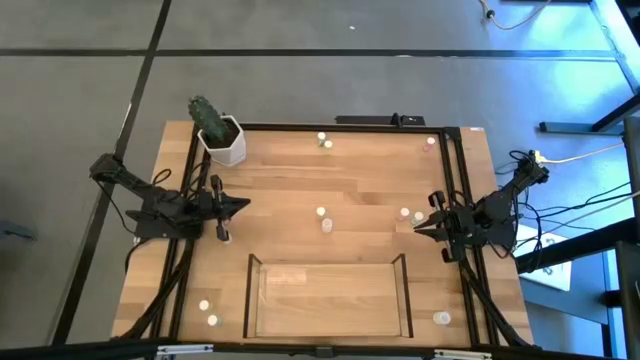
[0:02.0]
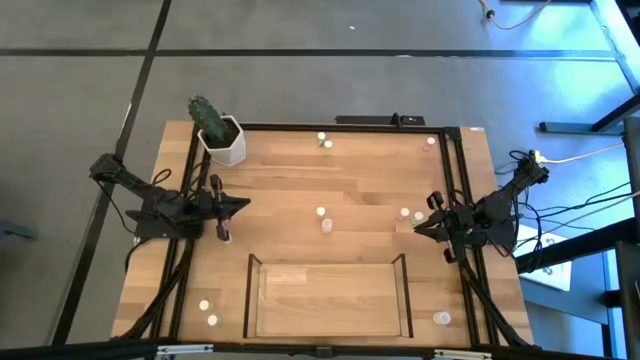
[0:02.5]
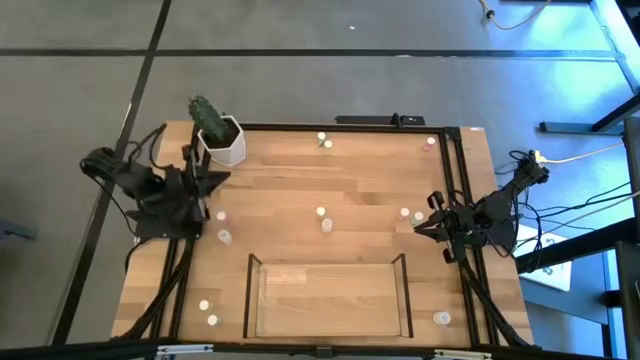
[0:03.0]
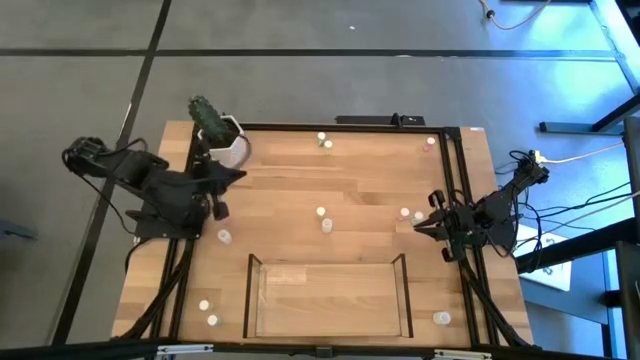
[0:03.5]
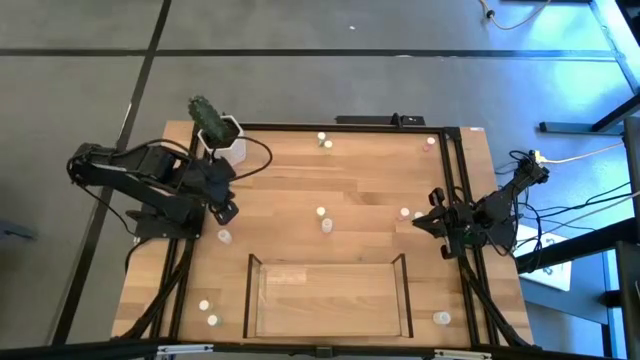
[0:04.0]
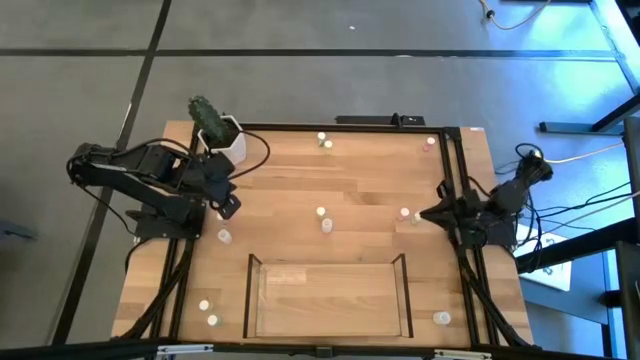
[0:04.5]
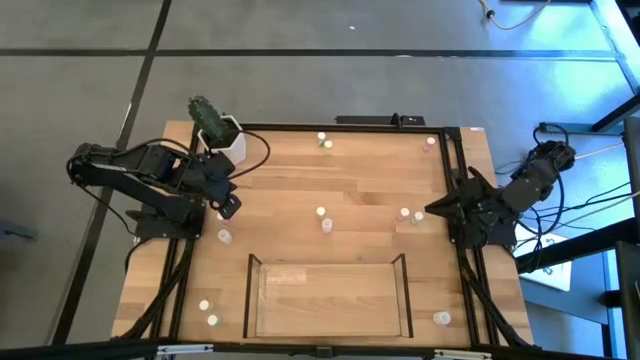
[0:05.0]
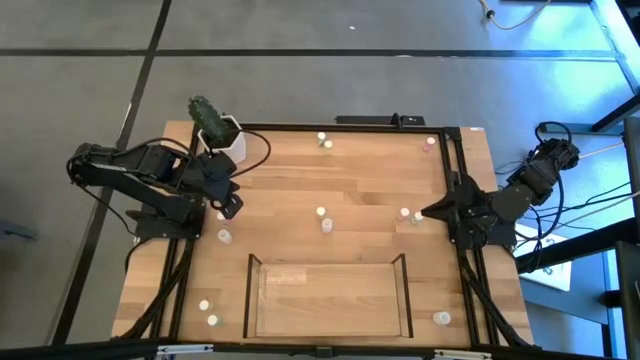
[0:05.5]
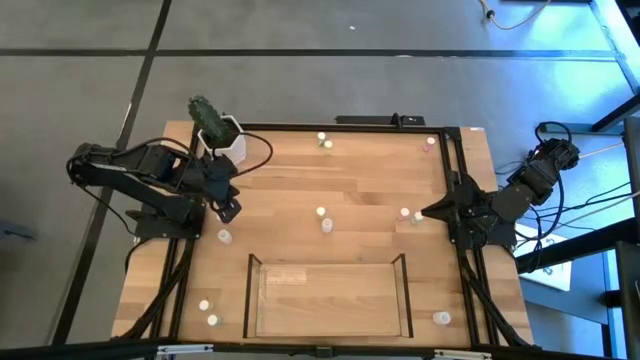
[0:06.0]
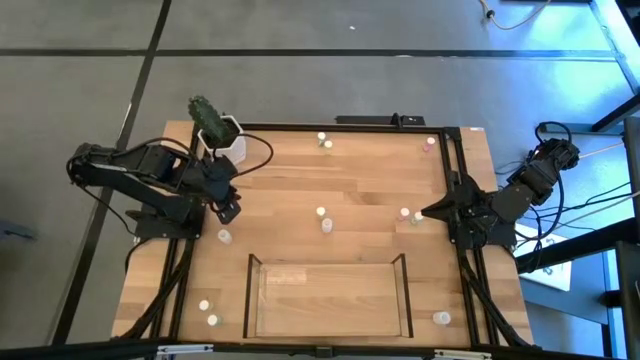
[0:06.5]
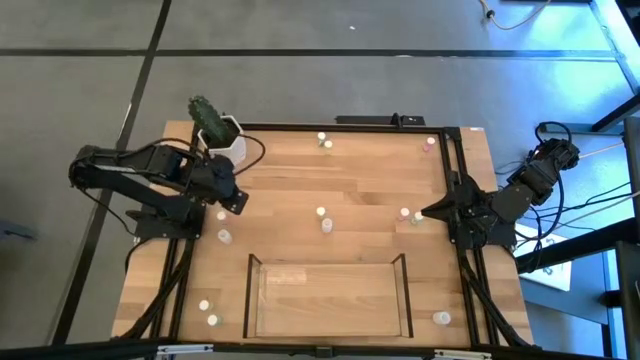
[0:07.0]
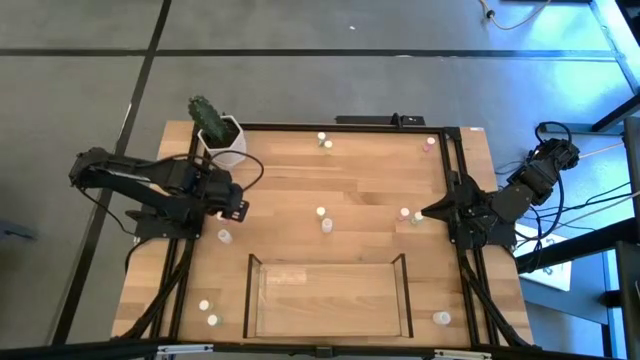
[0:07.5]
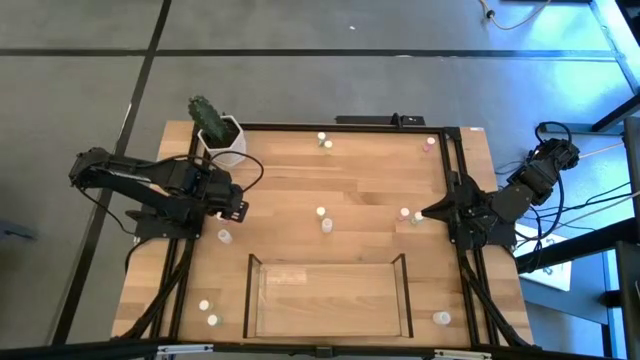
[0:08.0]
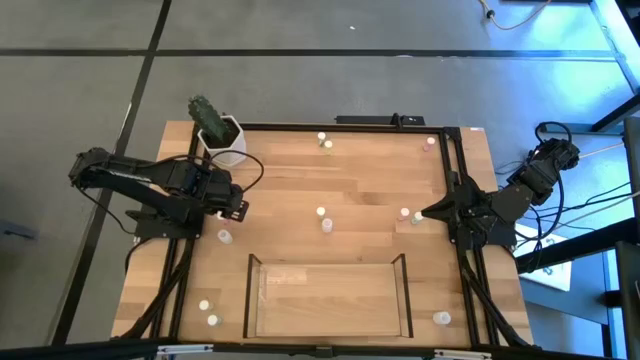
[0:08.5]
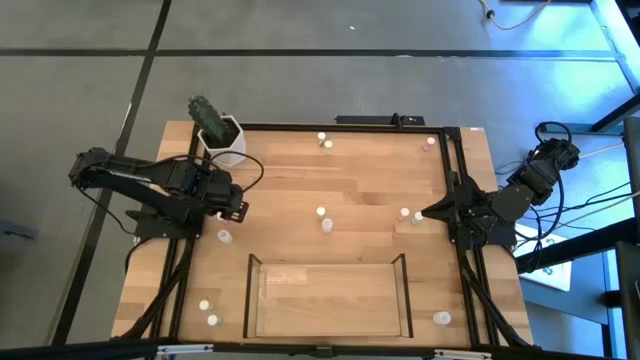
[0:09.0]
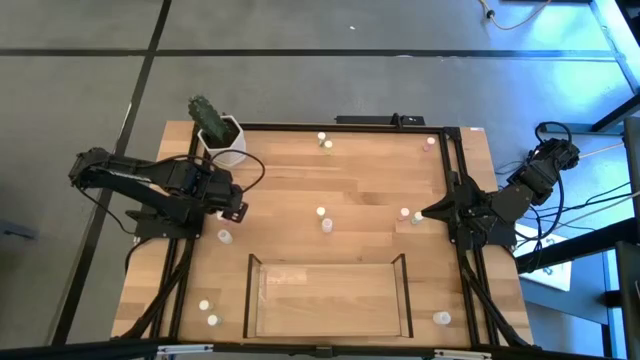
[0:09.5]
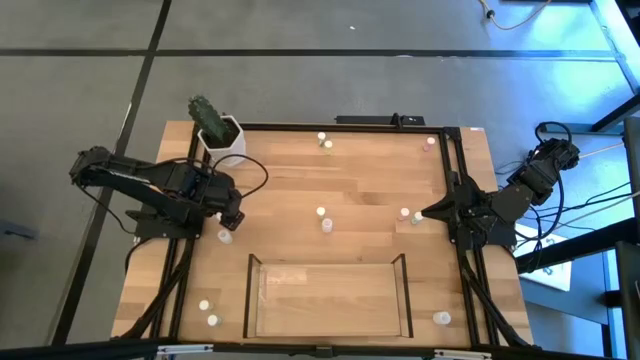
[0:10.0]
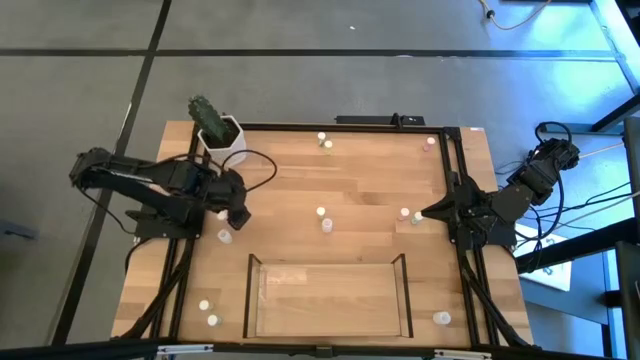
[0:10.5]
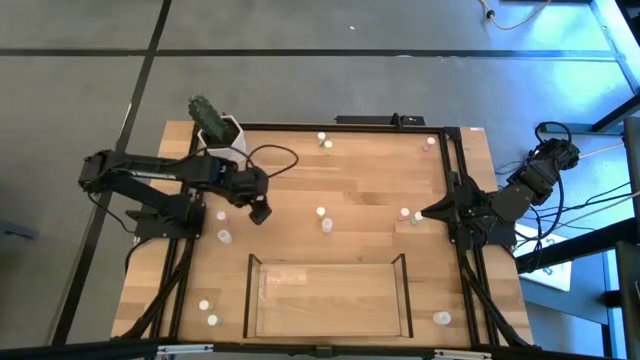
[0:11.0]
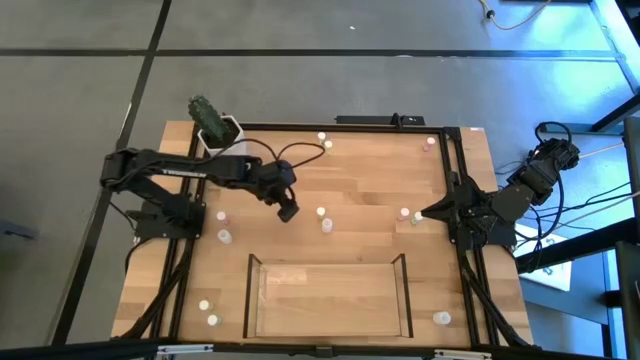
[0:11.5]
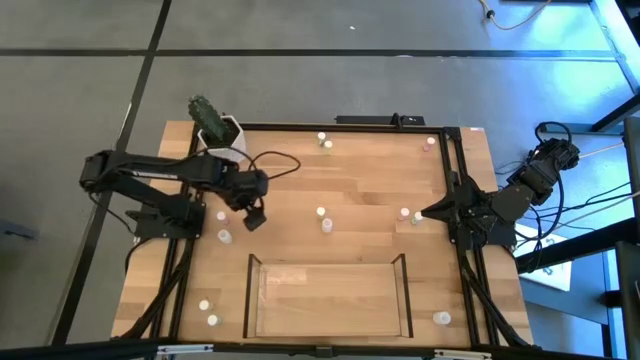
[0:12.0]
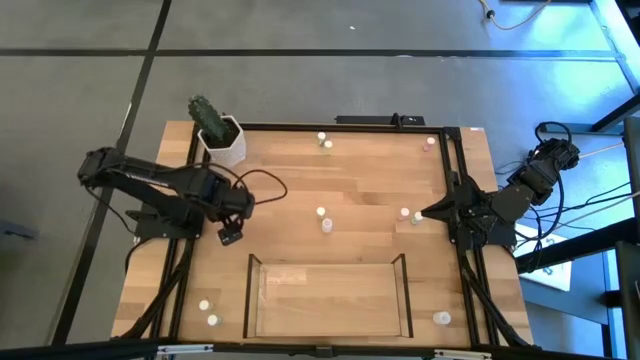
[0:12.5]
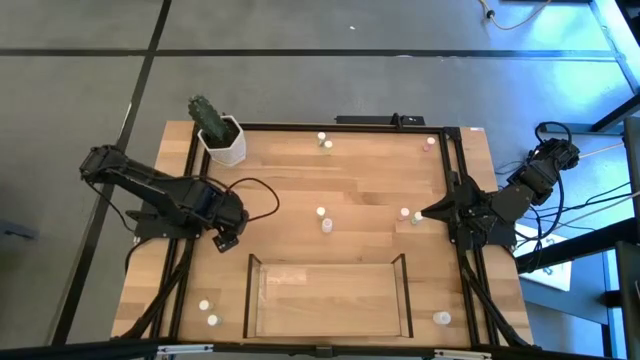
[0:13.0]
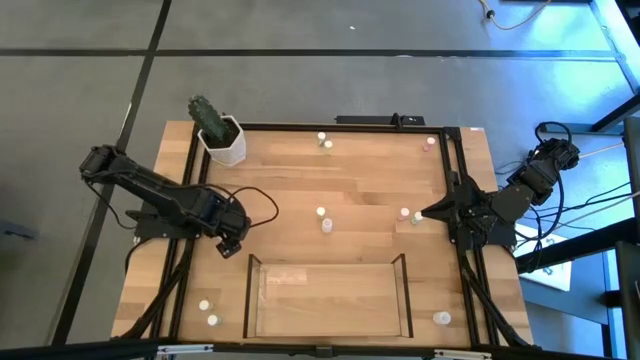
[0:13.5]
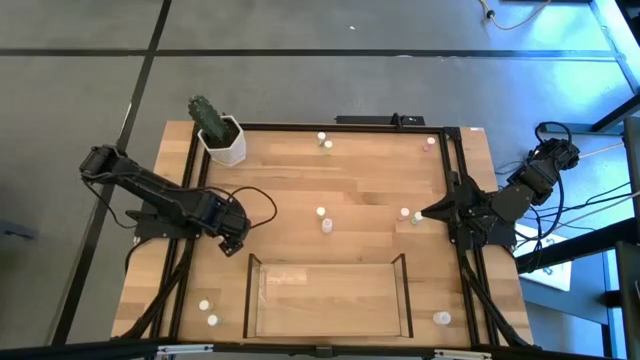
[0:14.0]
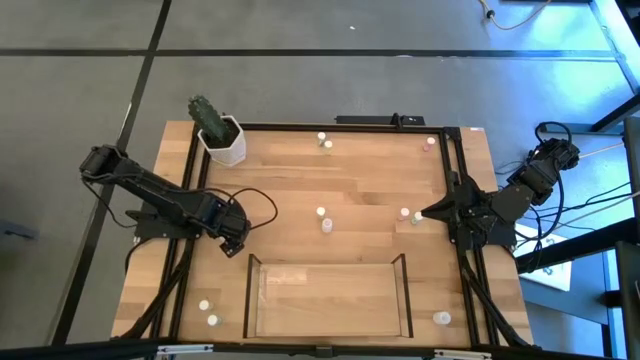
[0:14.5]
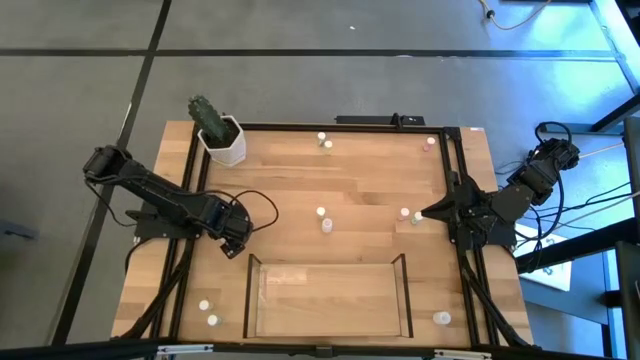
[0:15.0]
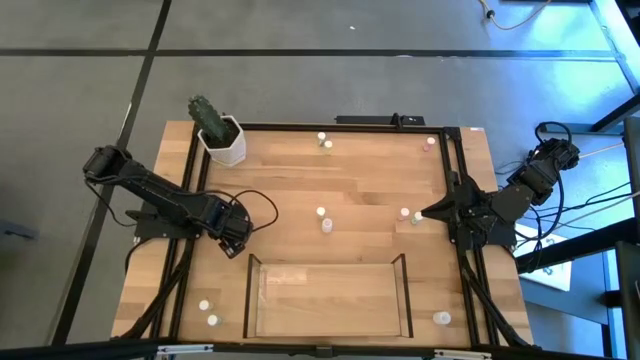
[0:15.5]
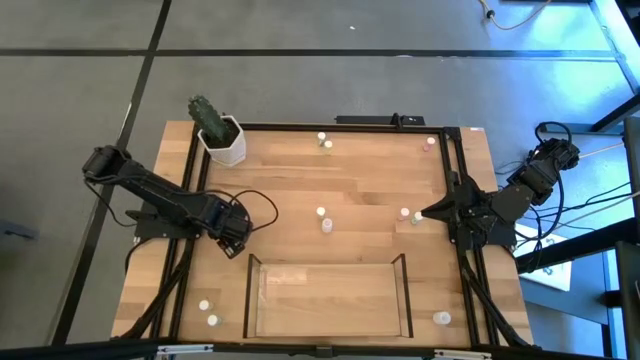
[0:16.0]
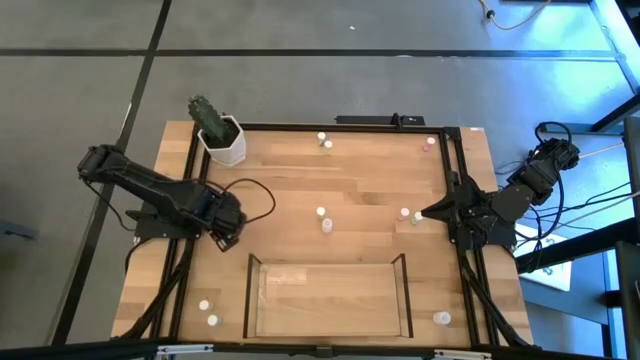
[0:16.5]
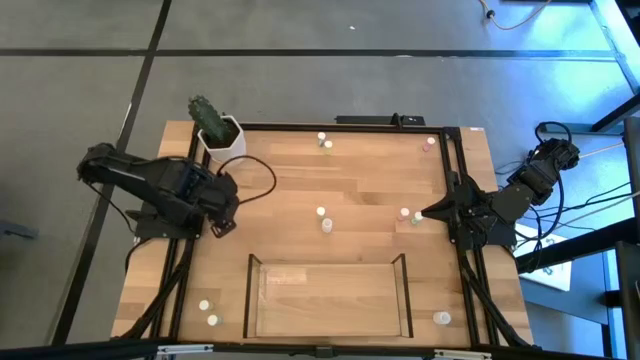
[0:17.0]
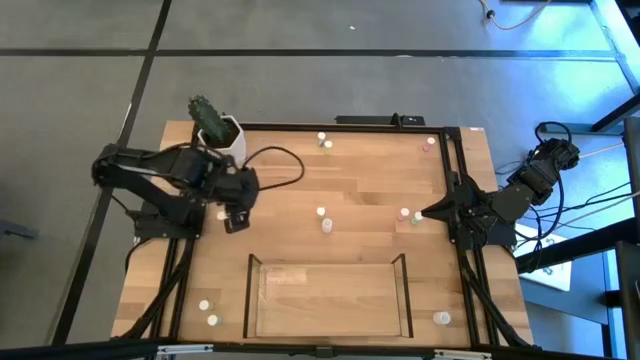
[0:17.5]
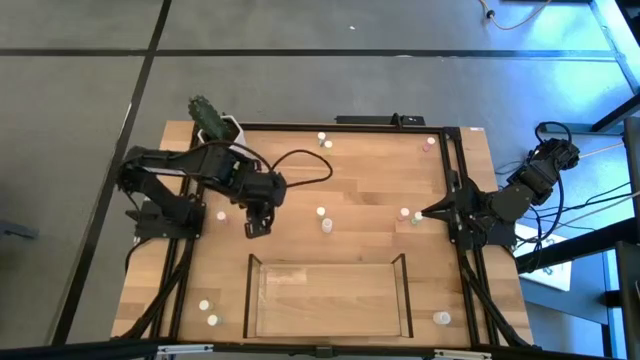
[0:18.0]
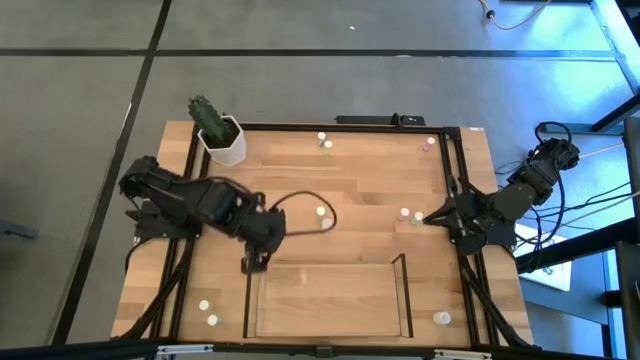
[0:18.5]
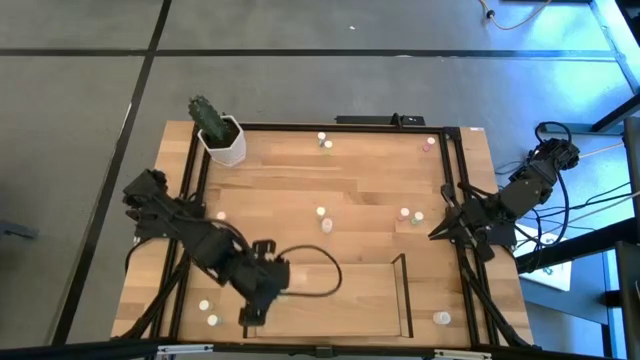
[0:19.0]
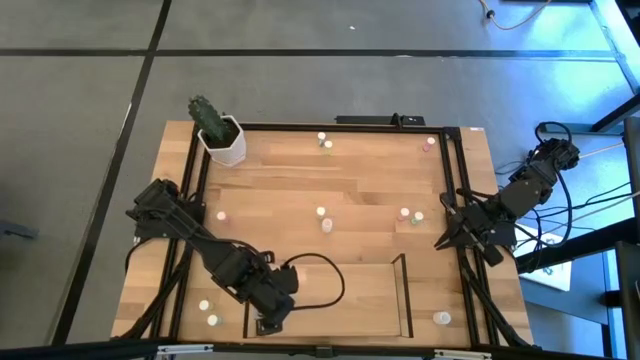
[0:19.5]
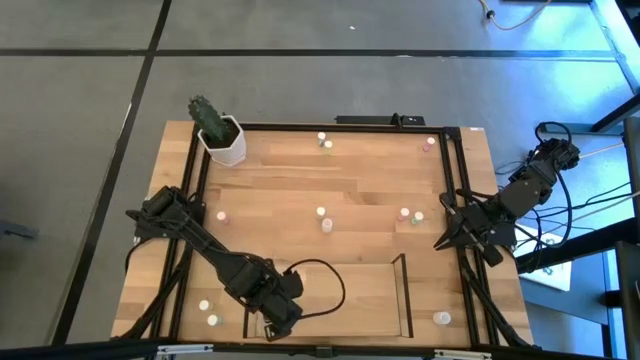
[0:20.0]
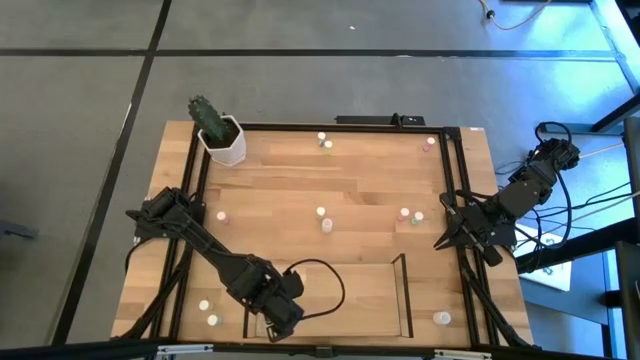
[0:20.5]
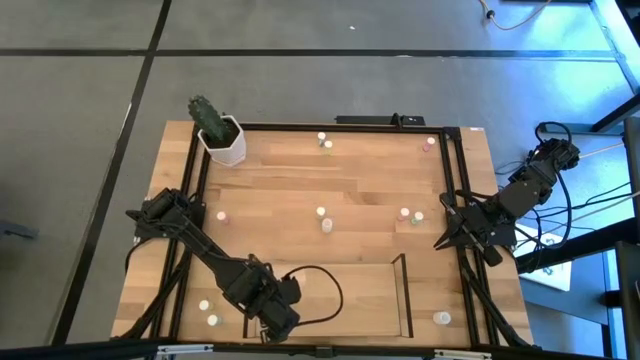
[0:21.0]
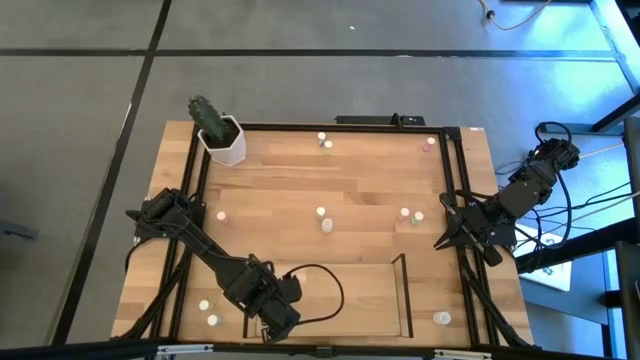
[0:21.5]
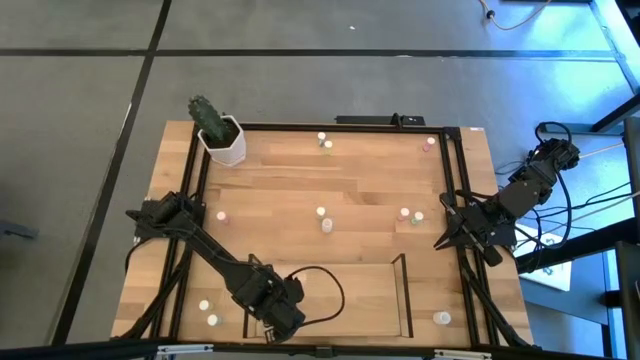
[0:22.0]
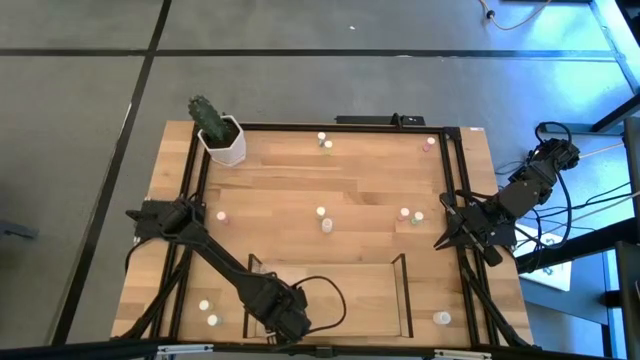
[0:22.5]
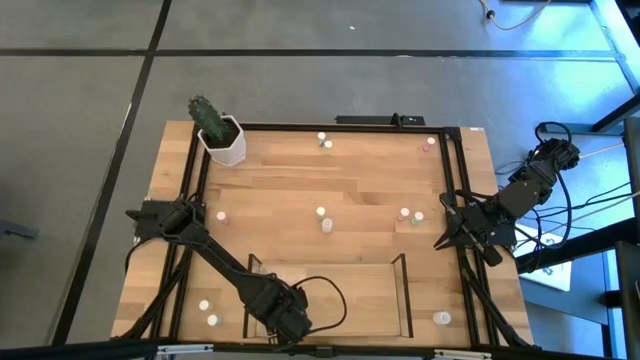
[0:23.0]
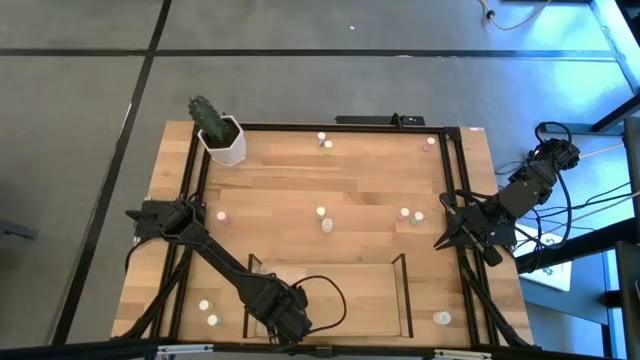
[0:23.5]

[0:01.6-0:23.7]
Task: Pick and place medicine bottles onto shelf by color
Put the left white pill bottle on the shelf
